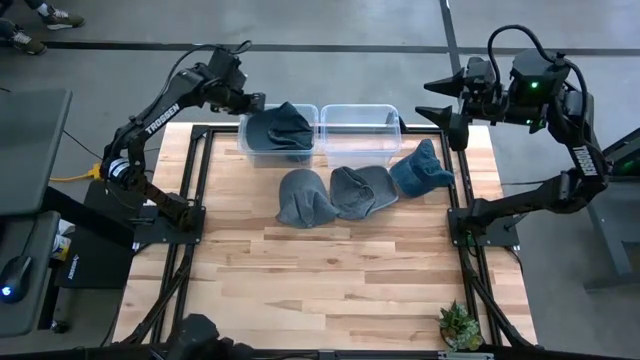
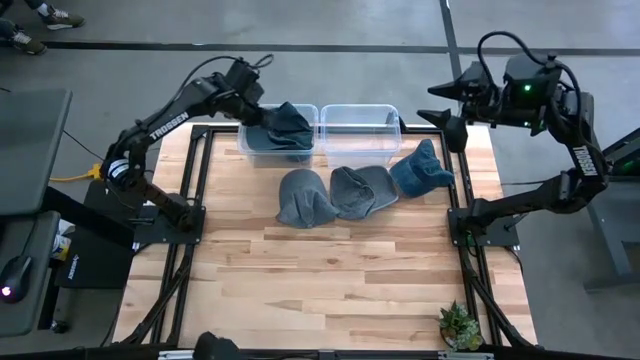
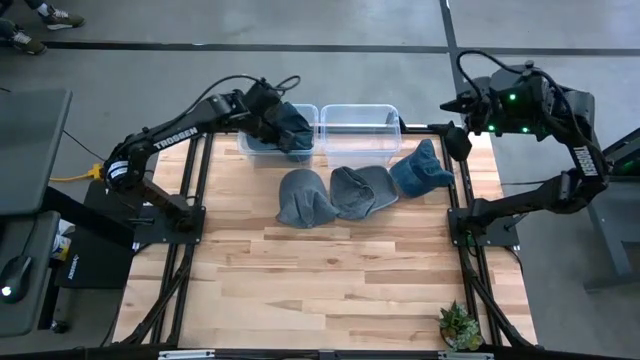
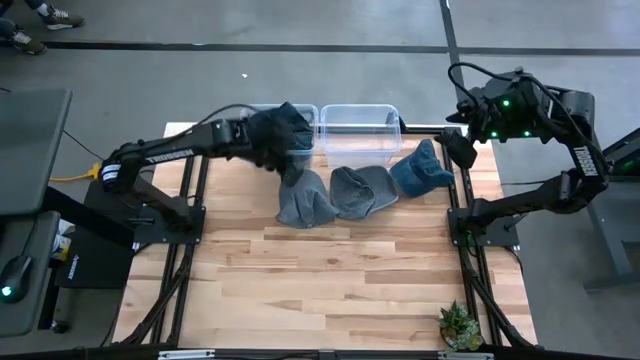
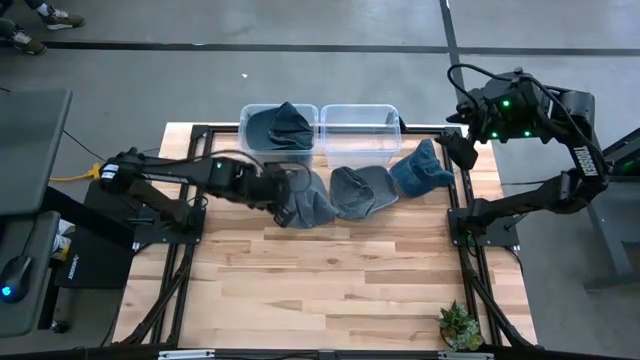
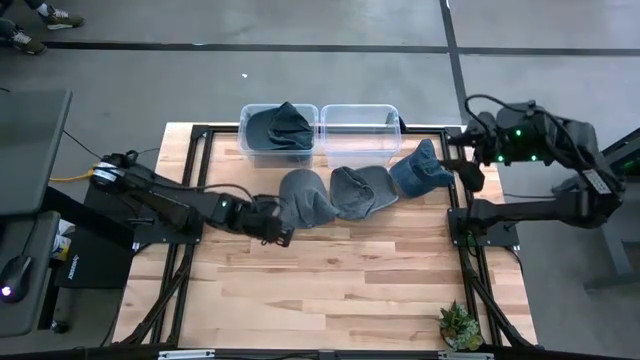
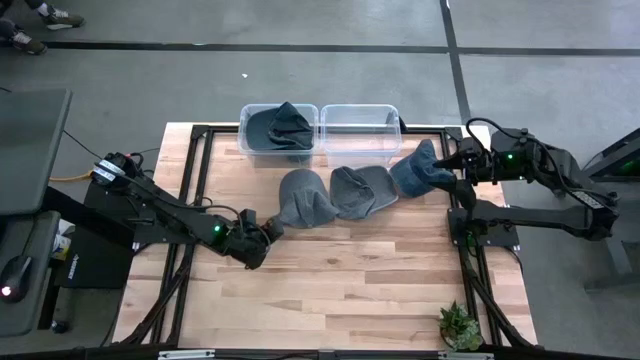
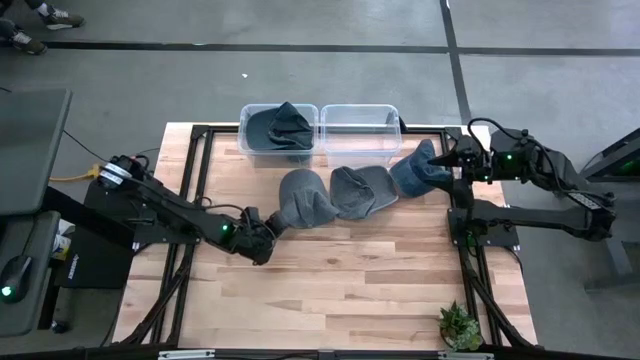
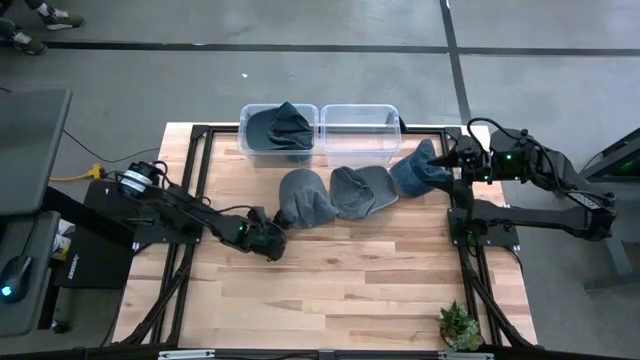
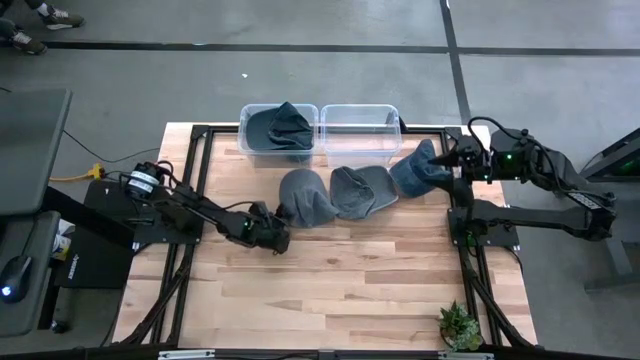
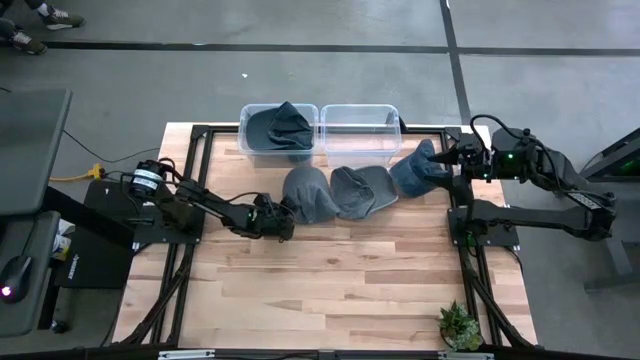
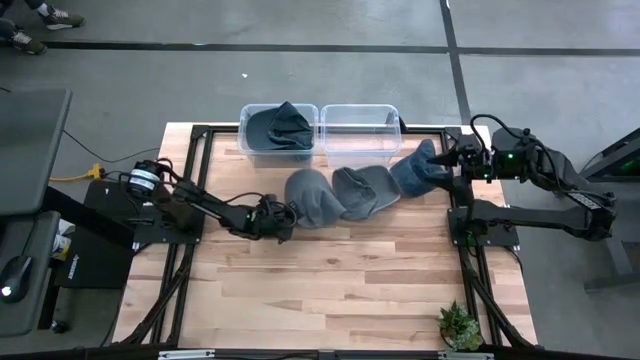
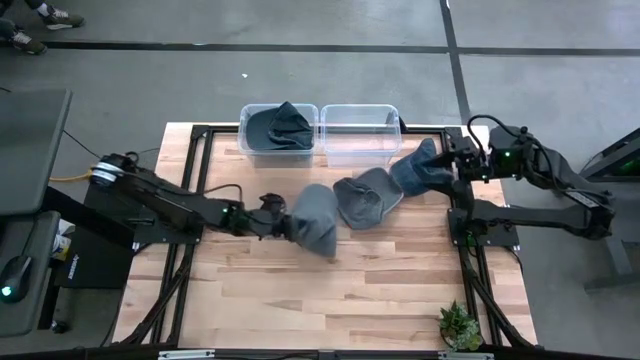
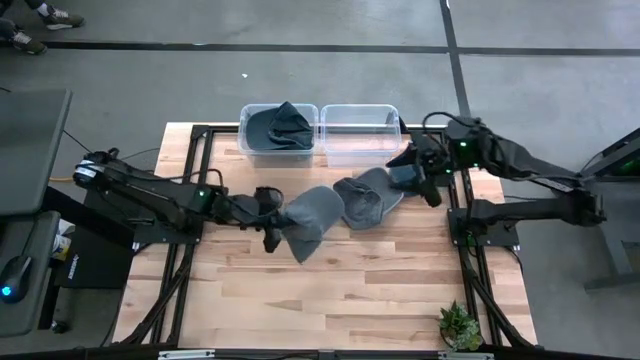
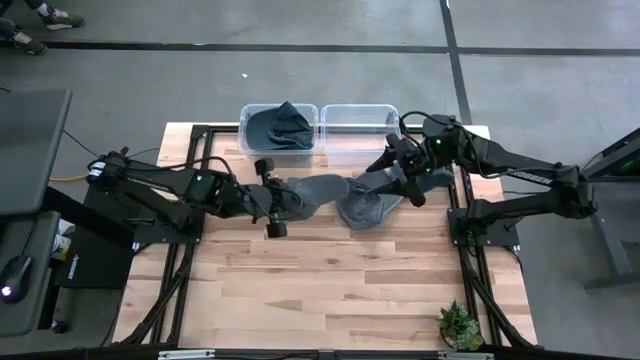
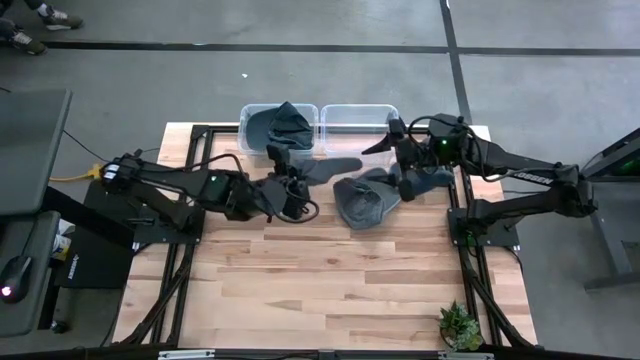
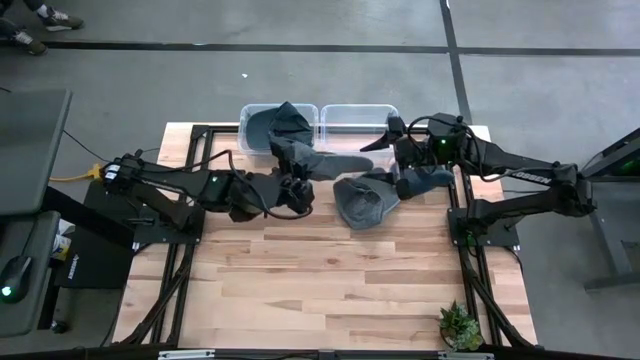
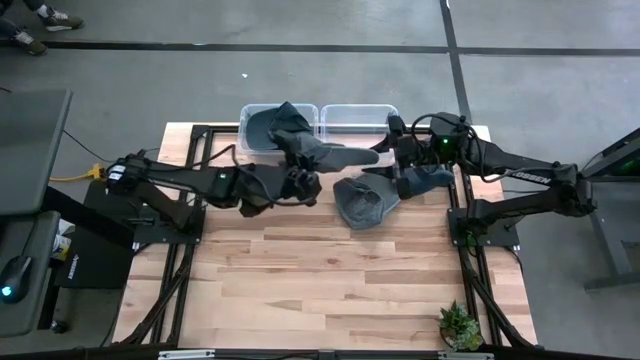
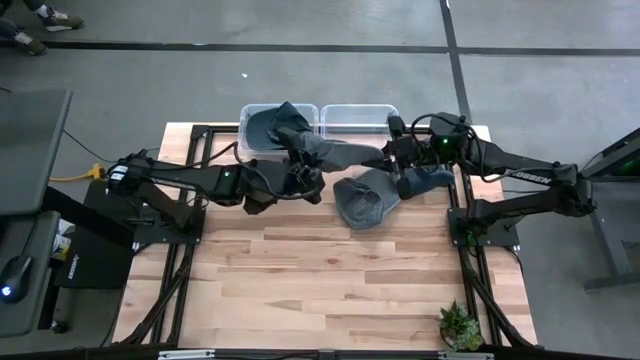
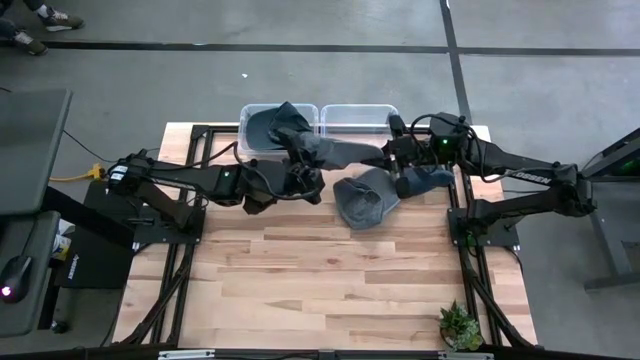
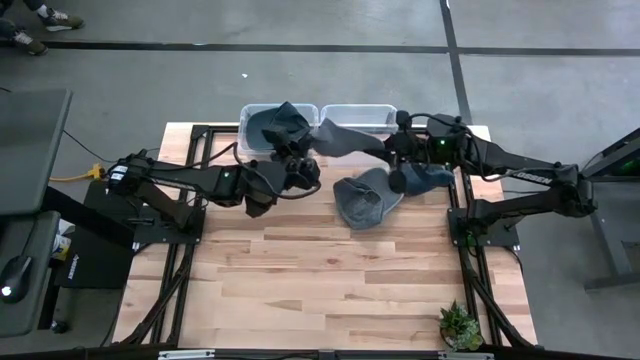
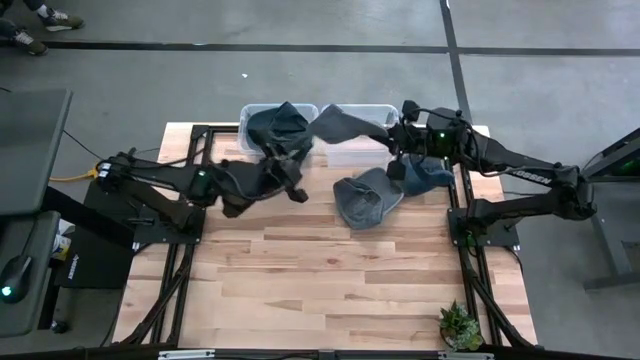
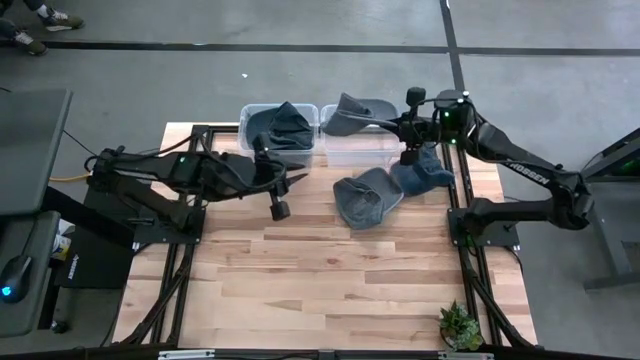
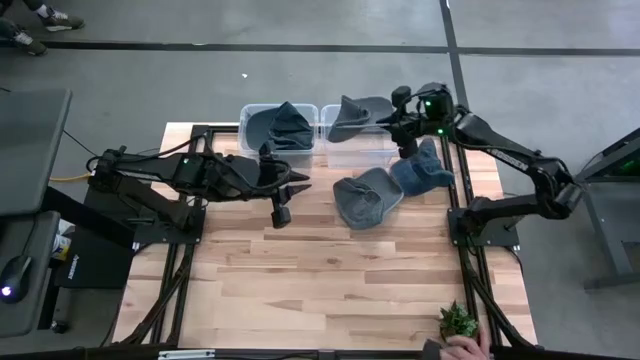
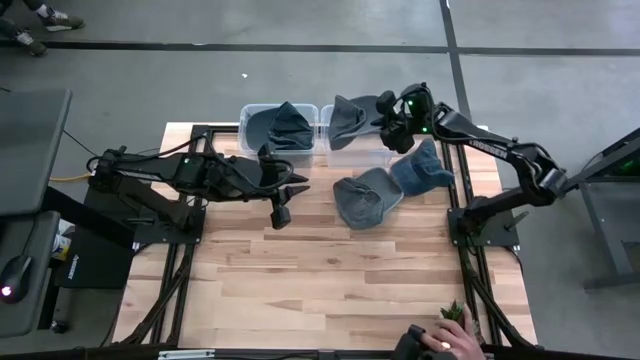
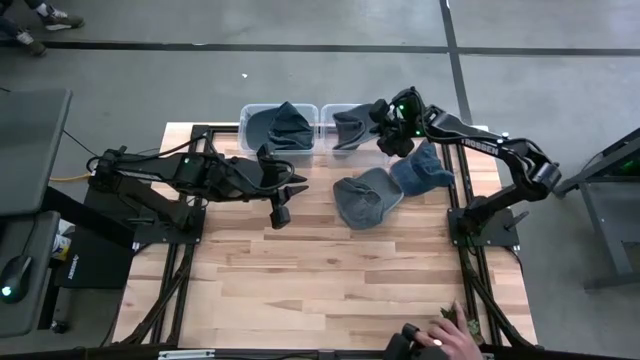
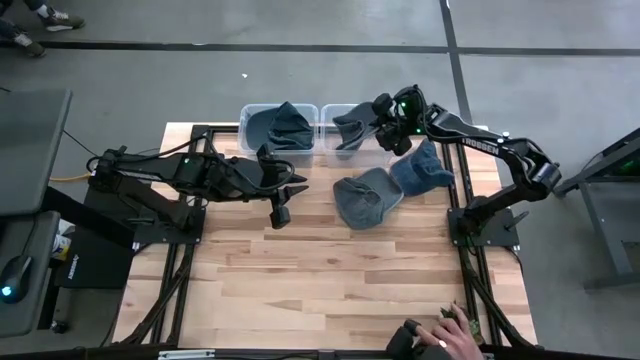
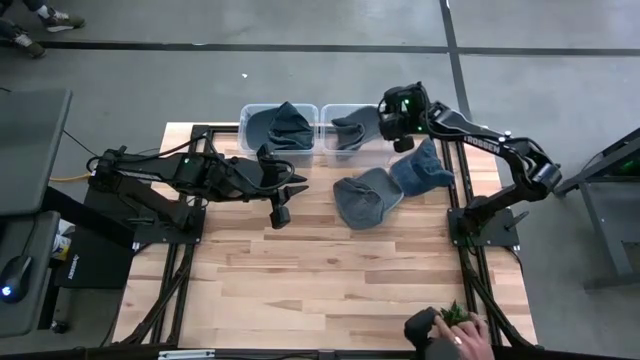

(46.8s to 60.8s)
Task: Pick and place caps into container
Put the left gray cap into the right transparent container
